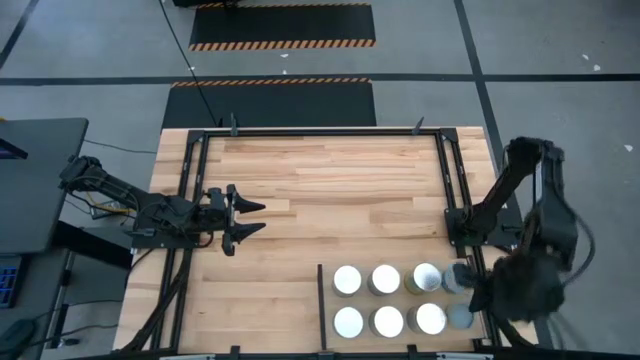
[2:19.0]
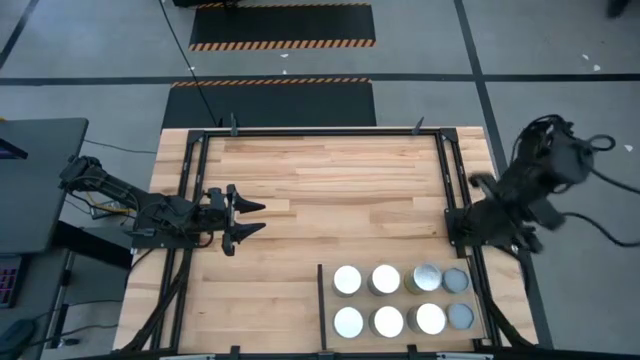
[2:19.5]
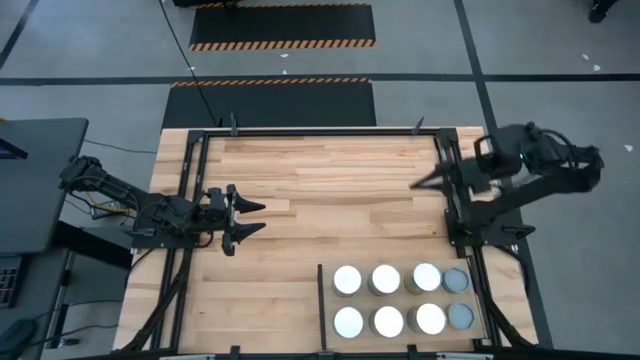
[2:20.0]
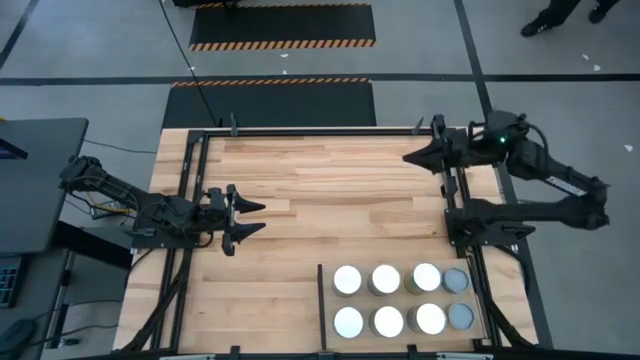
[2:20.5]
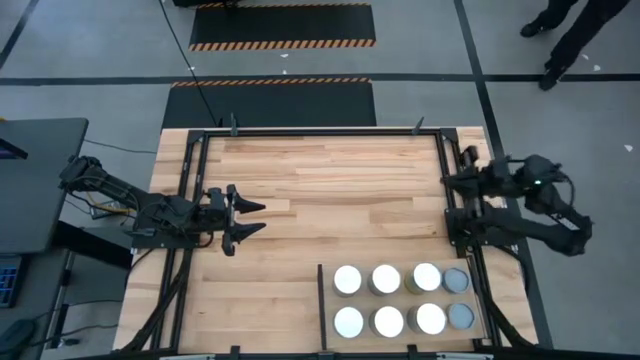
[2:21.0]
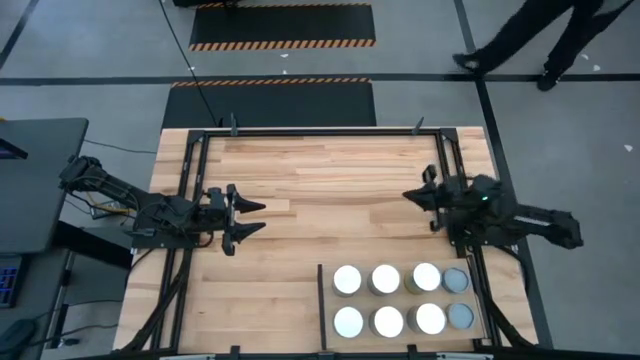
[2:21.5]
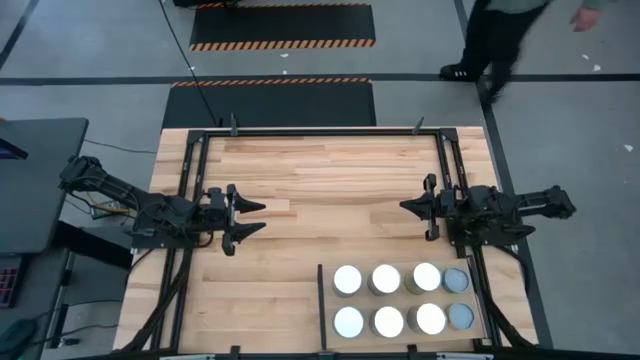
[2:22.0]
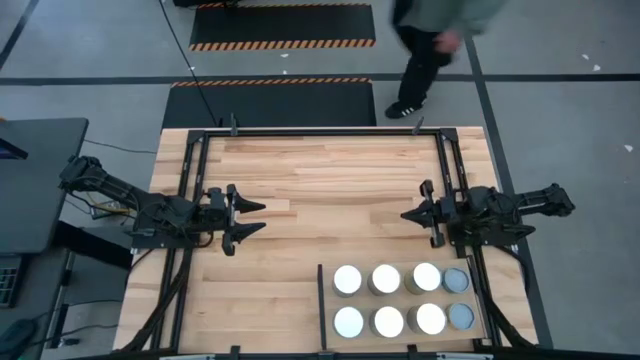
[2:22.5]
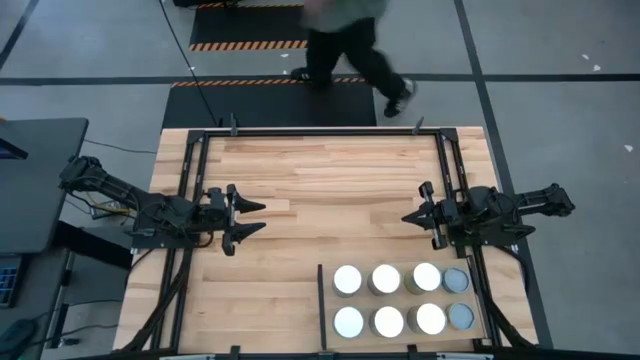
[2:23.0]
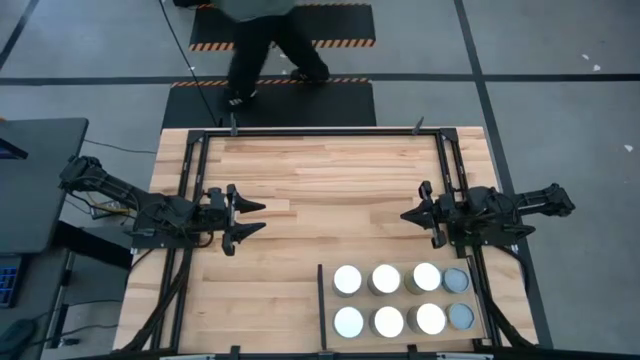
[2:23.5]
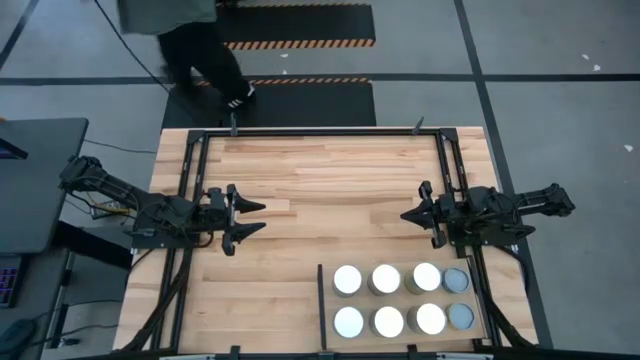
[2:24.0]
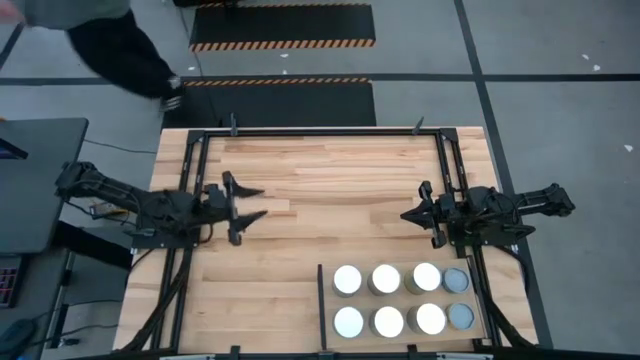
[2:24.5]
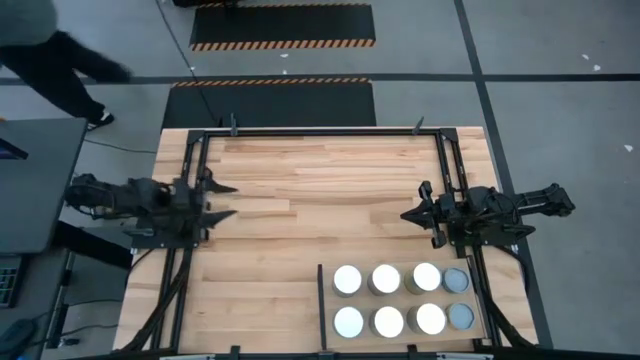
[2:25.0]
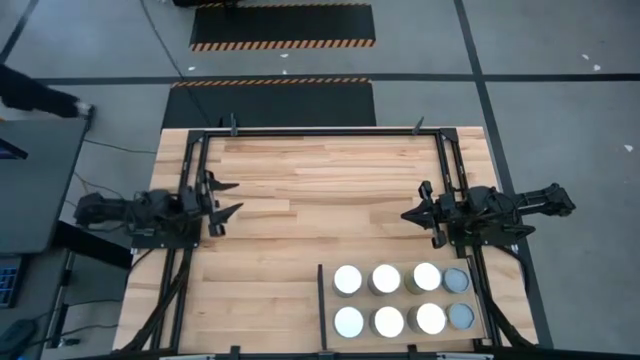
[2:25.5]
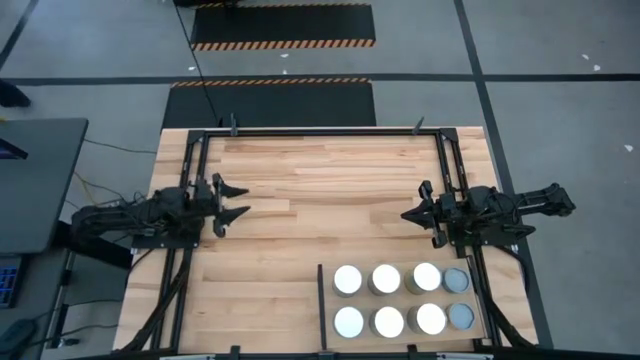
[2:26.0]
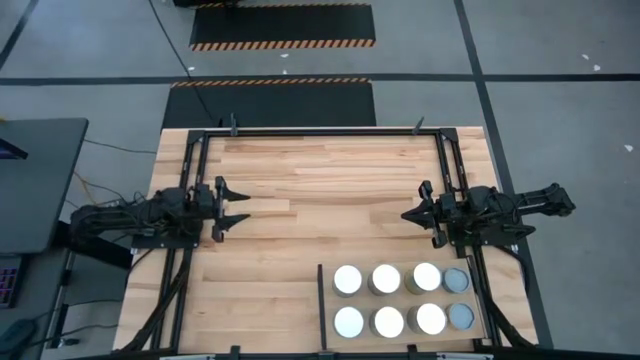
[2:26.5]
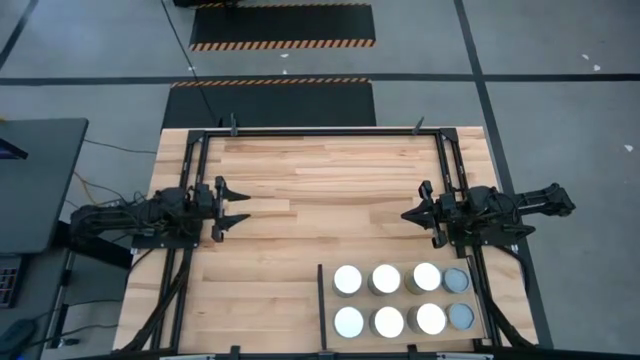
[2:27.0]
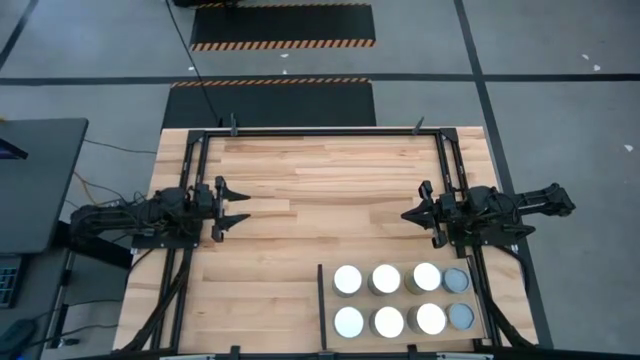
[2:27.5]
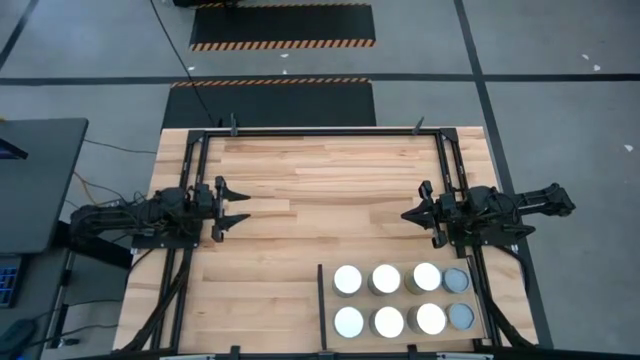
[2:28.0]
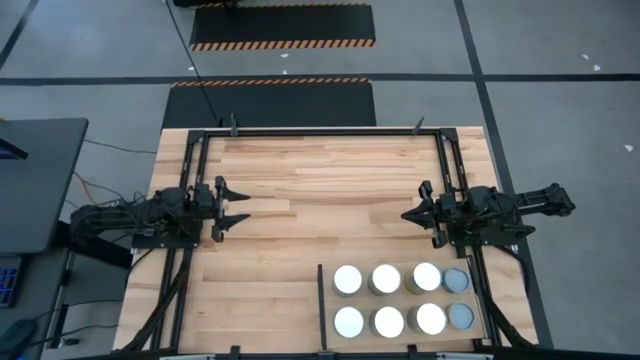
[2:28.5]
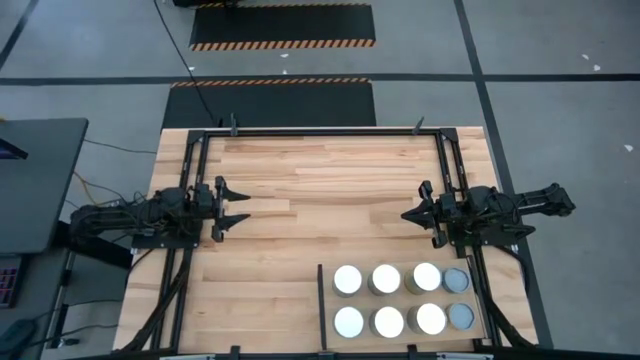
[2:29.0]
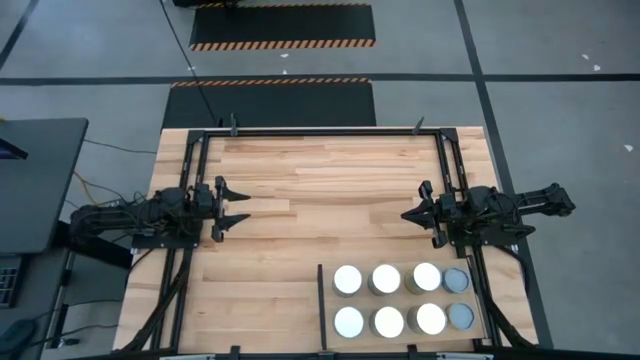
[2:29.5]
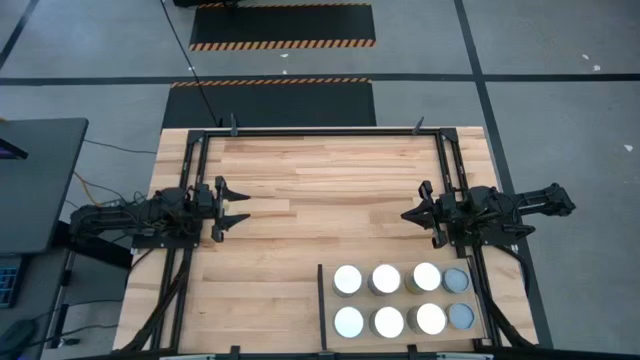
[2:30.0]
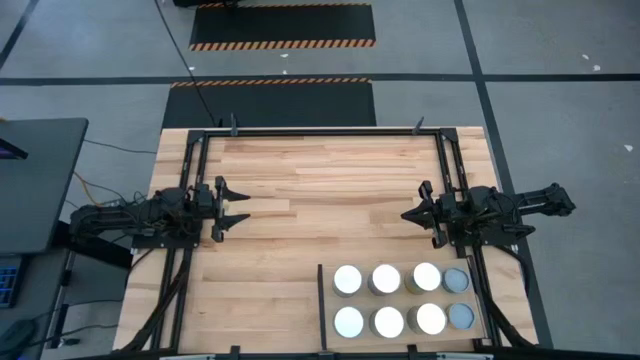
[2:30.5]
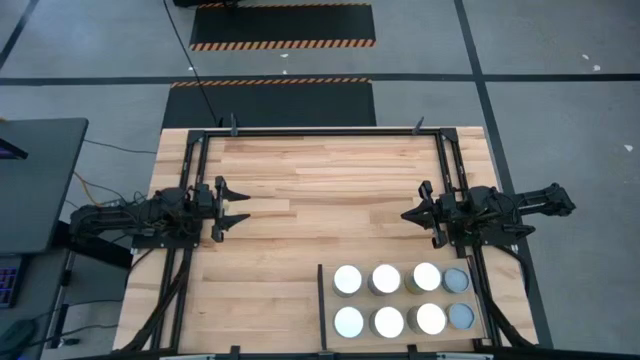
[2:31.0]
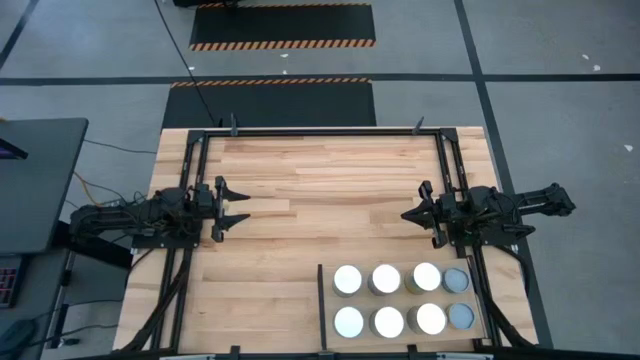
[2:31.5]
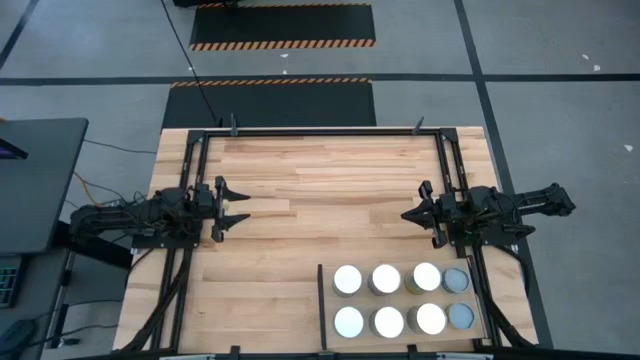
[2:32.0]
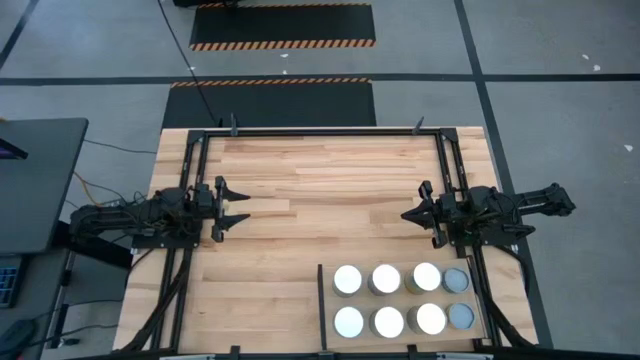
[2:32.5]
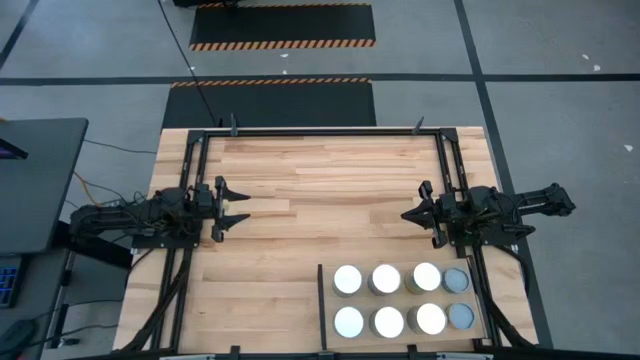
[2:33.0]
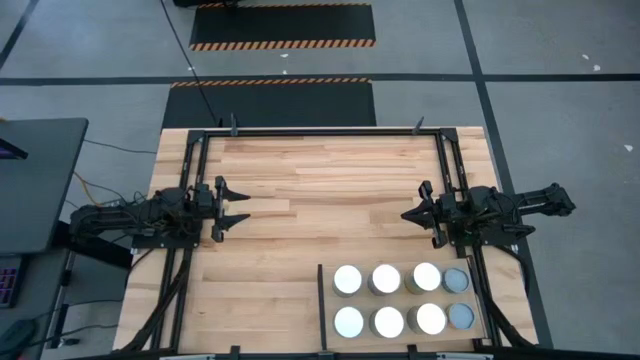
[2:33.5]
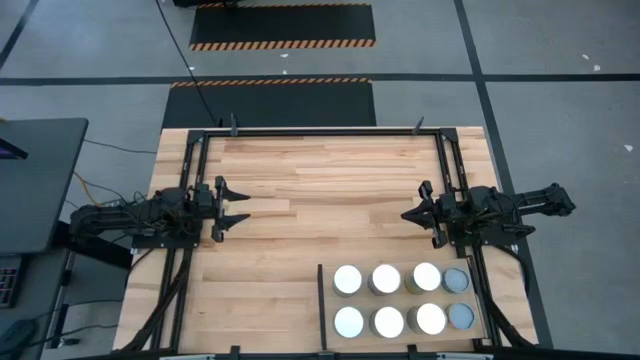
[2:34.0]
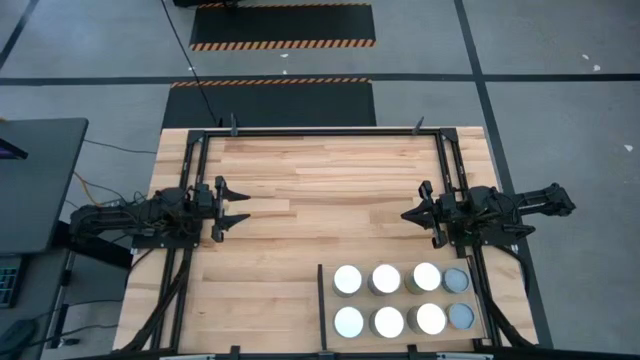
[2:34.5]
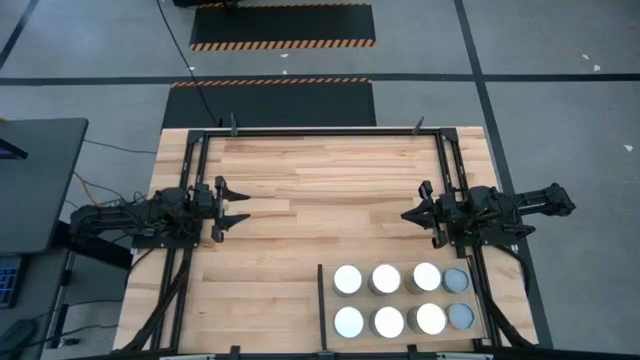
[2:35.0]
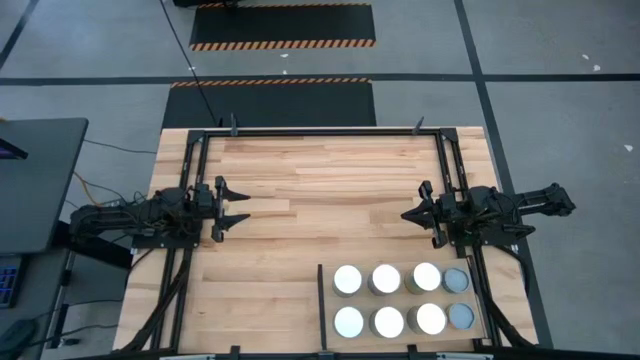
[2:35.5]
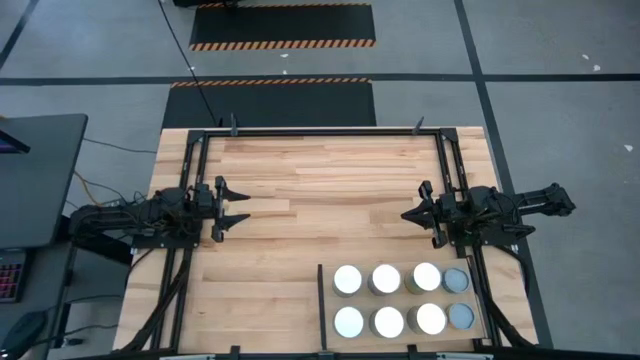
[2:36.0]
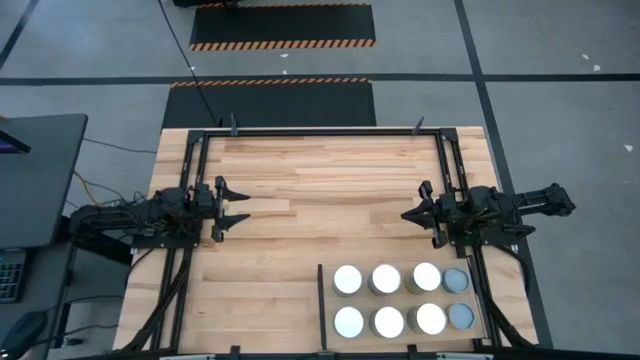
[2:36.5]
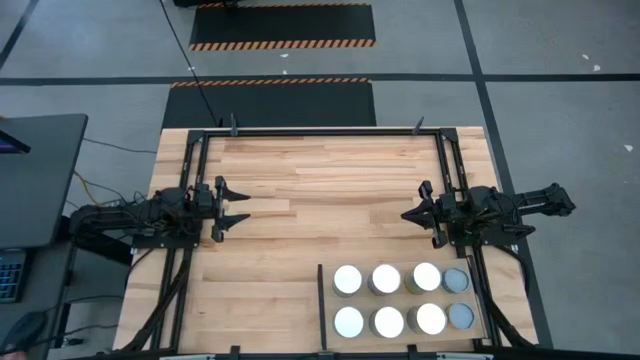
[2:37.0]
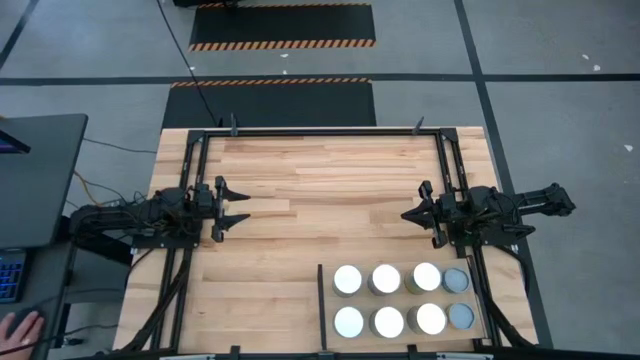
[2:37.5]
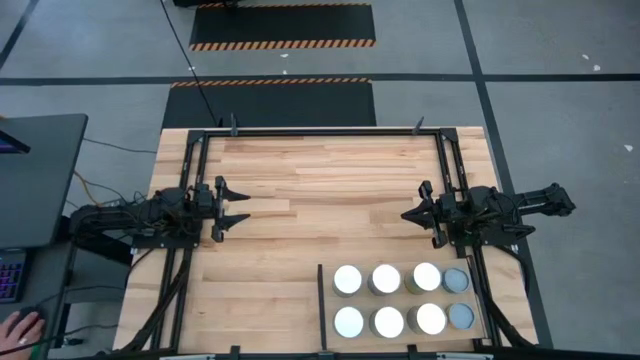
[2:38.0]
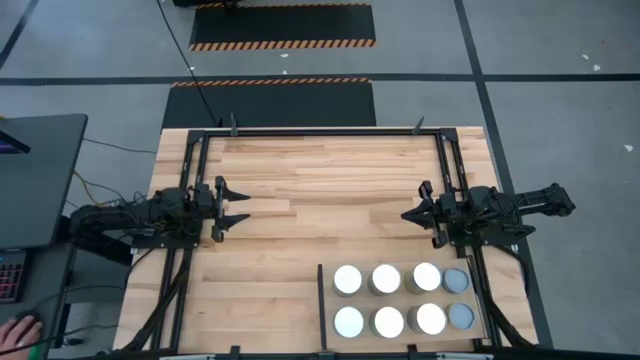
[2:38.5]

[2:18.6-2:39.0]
Task: Pick and place cans onto a shelf
Return to Home Position

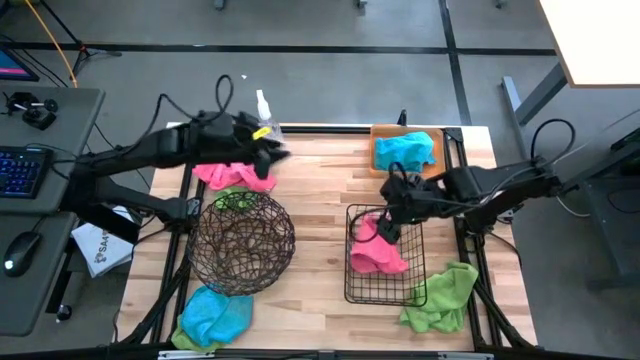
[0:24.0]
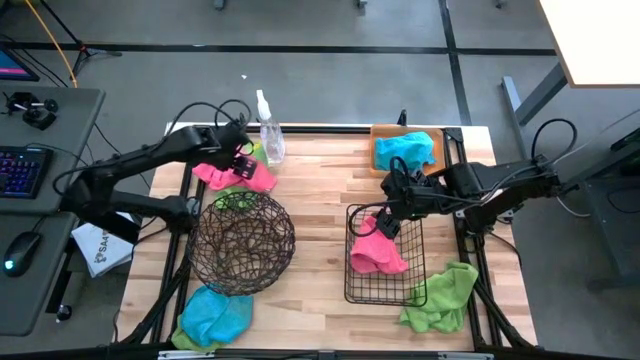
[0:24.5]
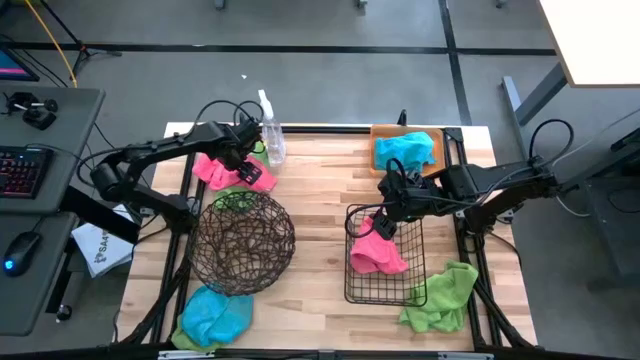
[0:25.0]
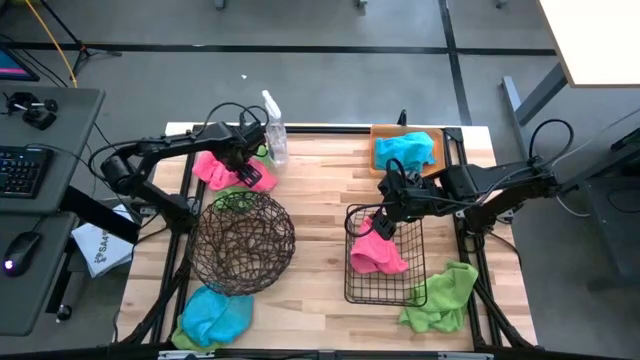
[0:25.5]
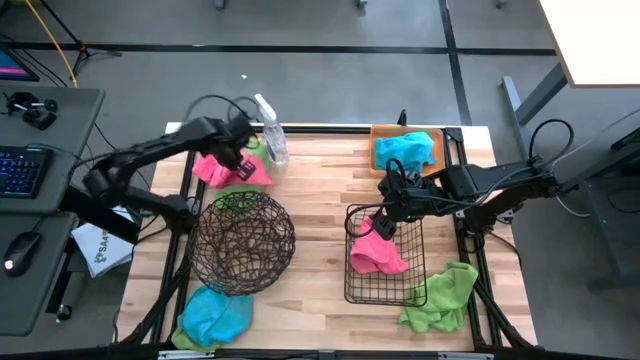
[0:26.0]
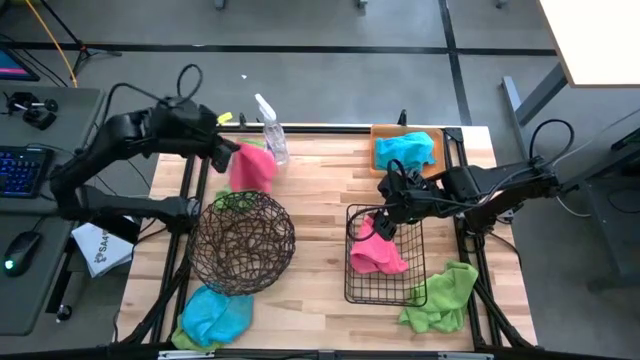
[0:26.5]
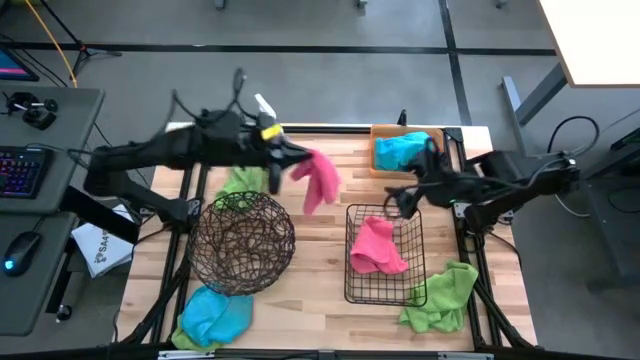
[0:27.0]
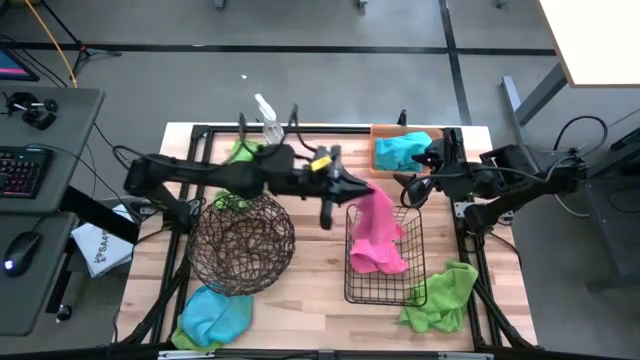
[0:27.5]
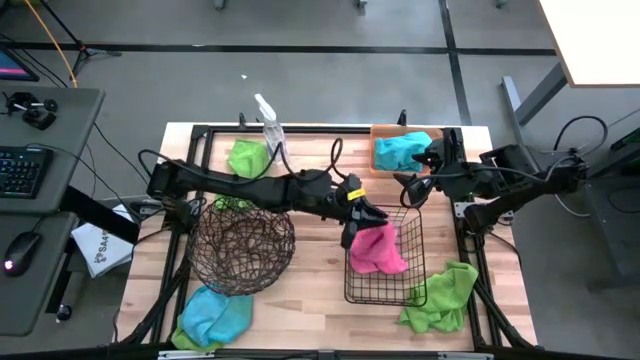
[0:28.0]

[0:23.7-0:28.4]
Task: Sort microfiber towel by color & place in baskets
Put the pink towel into the wire basket
